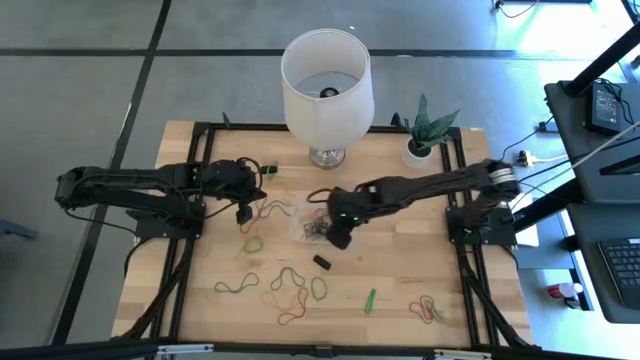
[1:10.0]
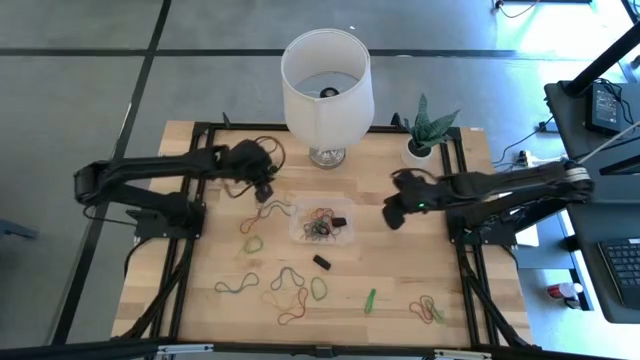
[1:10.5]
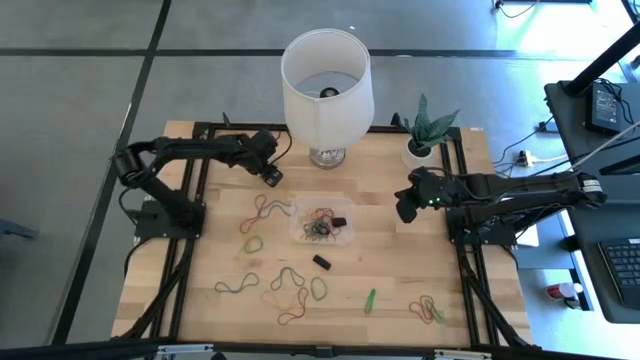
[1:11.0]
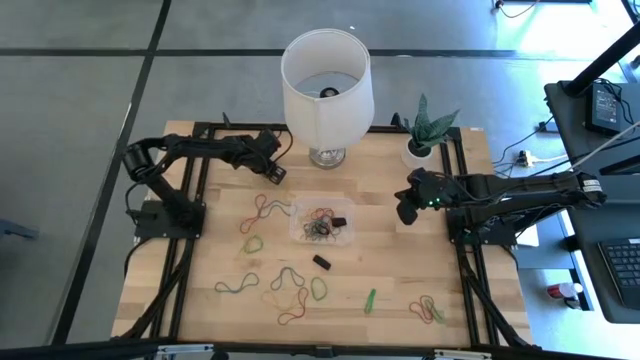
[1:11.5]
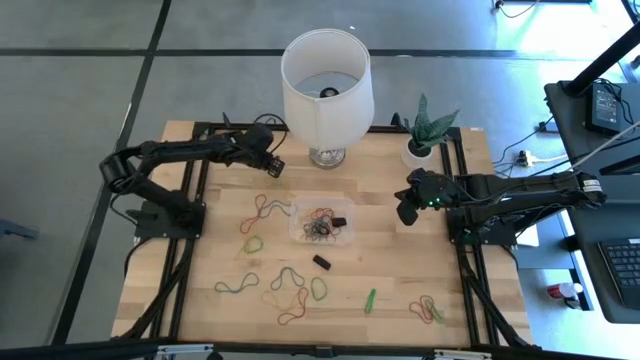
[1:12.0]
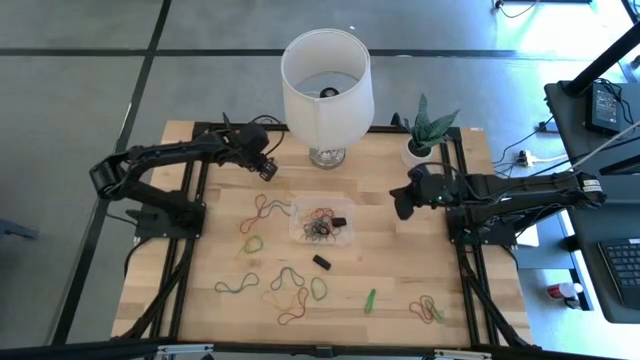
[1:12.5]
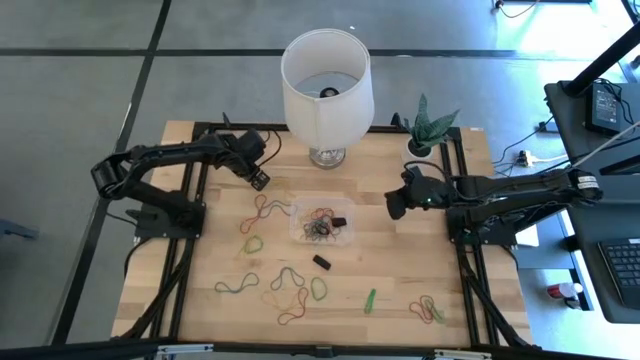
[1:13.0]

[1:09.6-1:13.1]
Task: Pick and place rubber bands into bin
Put the green rubber band into the container

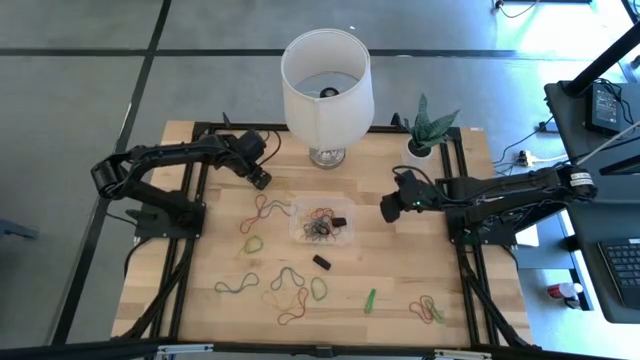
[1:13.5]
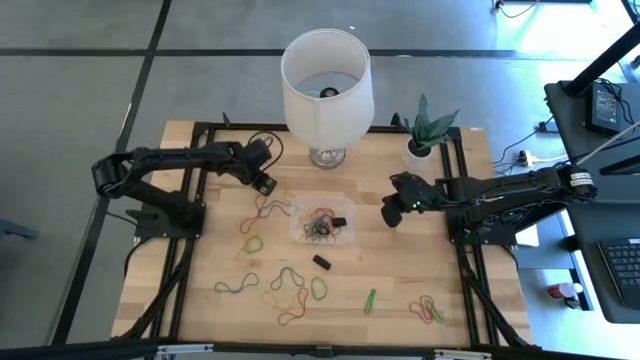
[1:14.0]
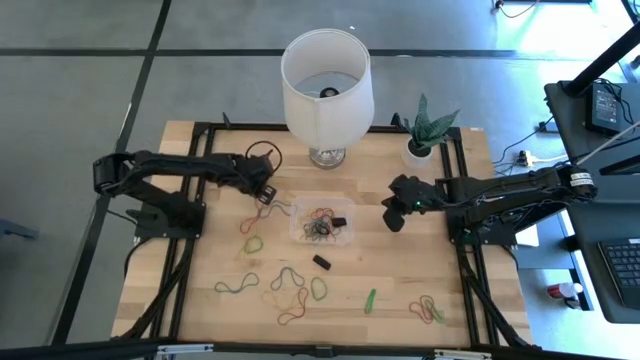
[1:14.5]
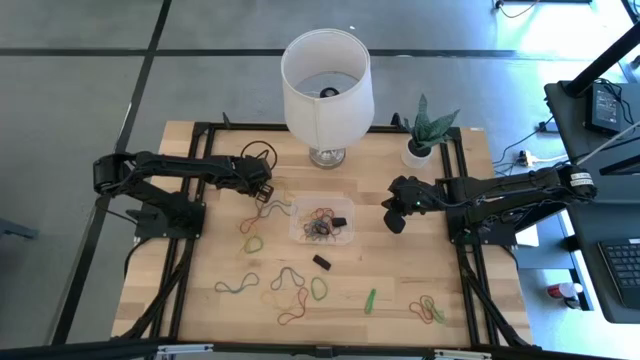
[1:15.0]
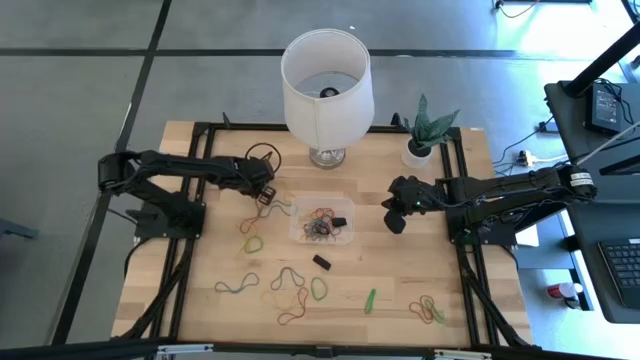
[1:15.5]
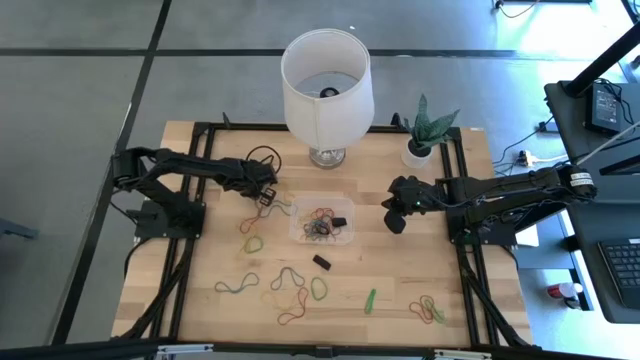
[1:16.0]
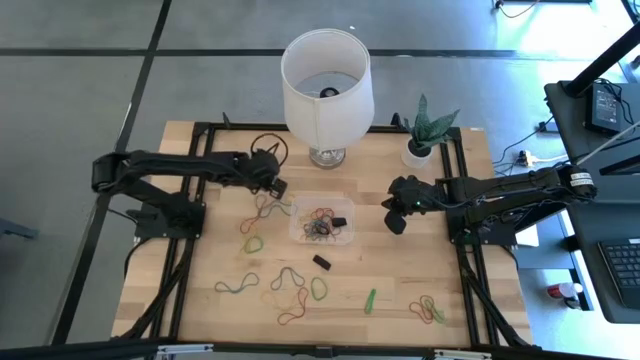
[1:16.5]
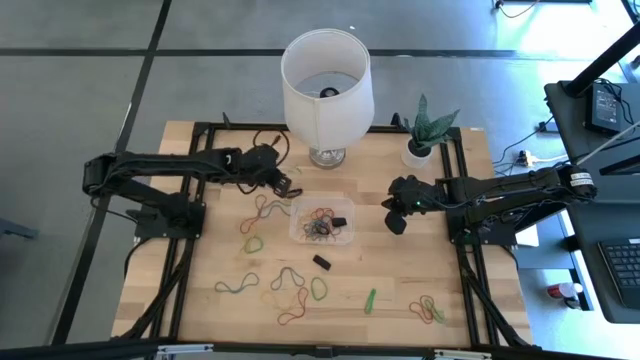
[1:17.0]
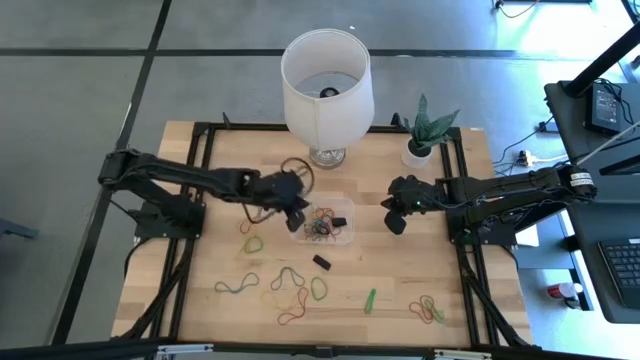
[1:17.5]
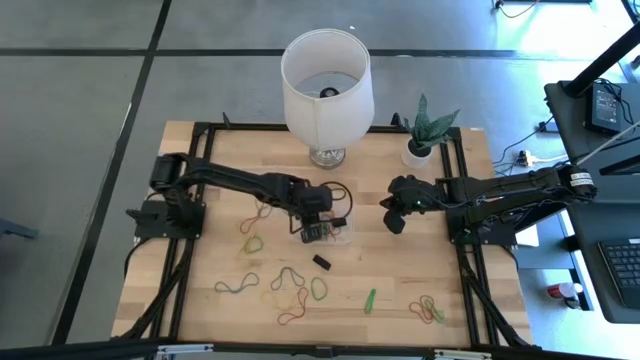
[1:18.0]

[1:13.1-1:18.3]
Put the green rubber band into the container

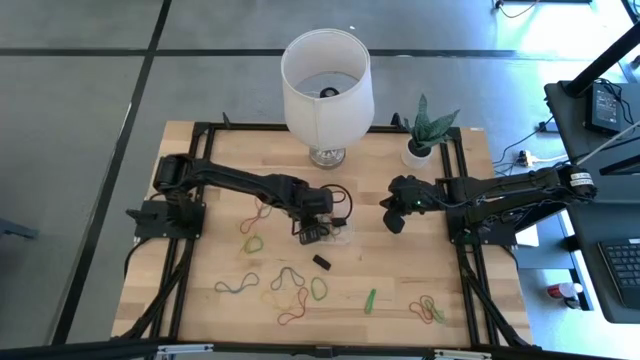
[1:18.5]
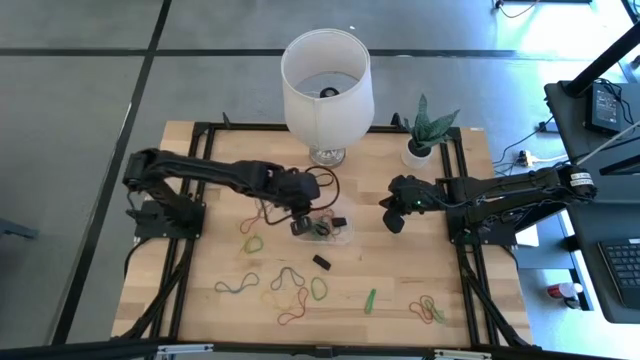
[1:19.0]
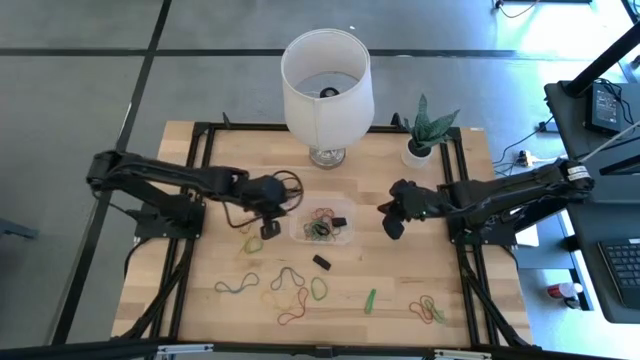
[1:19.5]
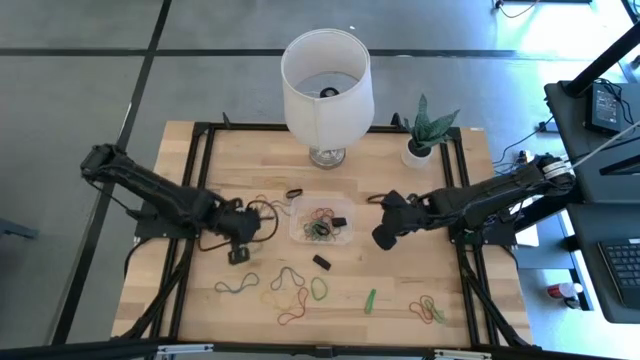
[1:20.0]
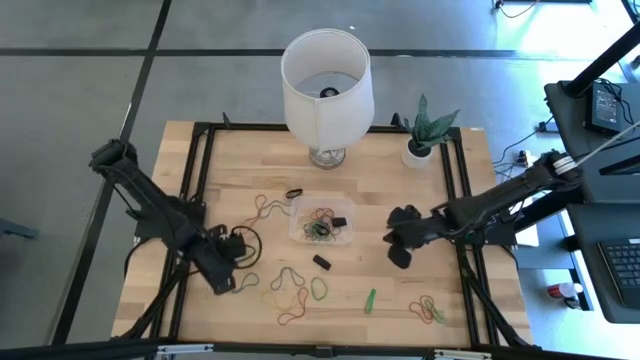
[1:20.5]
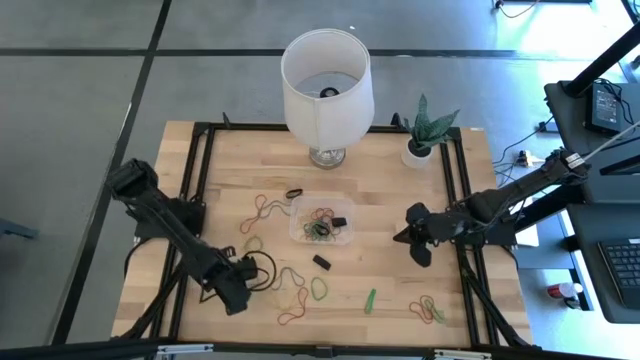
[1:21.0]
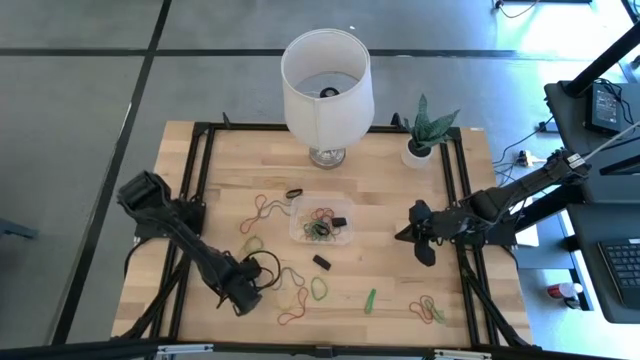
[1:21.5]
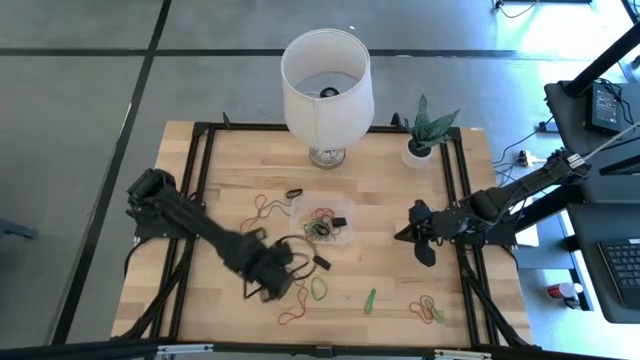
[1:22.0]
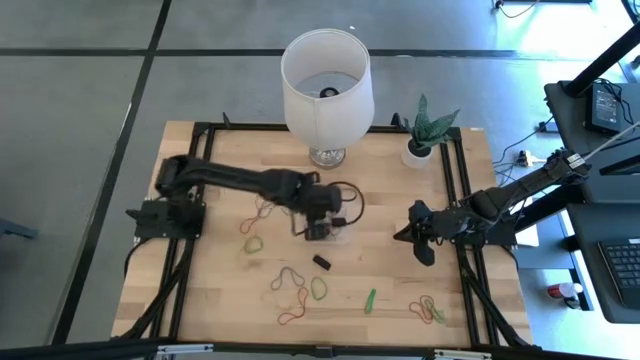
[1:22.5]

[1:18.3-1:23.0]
Put the left blue rubber band into the container

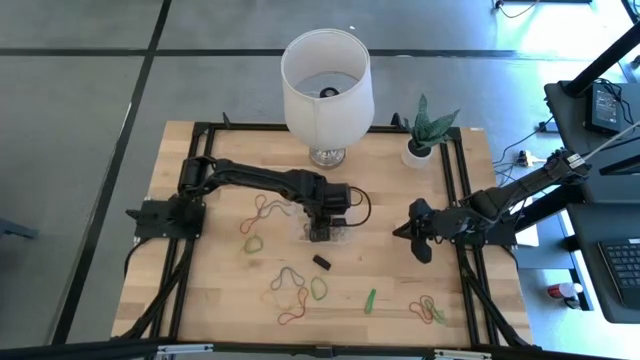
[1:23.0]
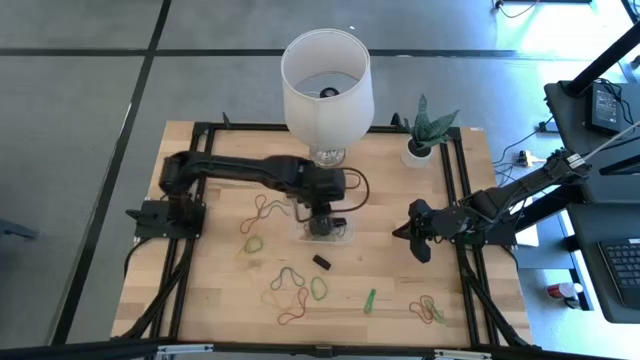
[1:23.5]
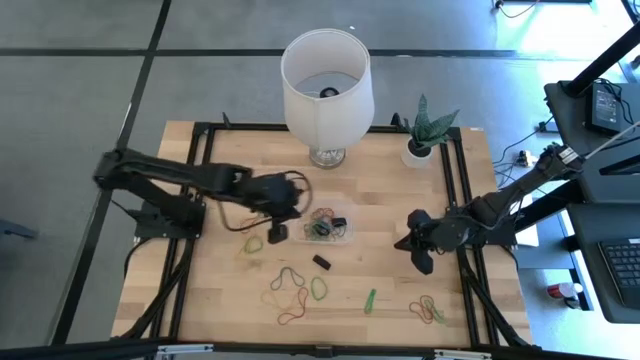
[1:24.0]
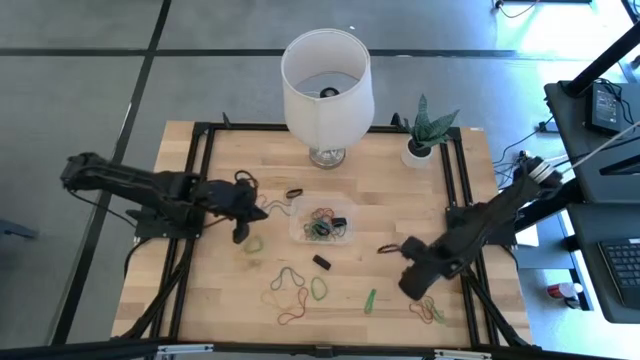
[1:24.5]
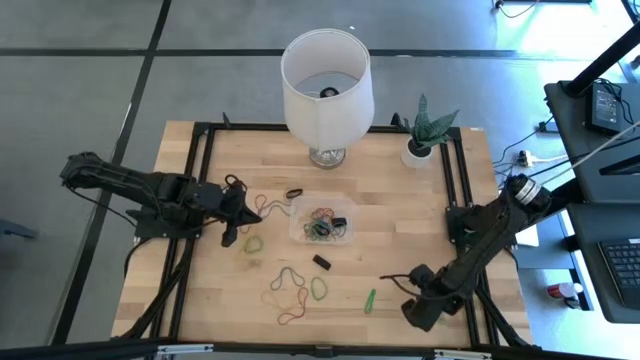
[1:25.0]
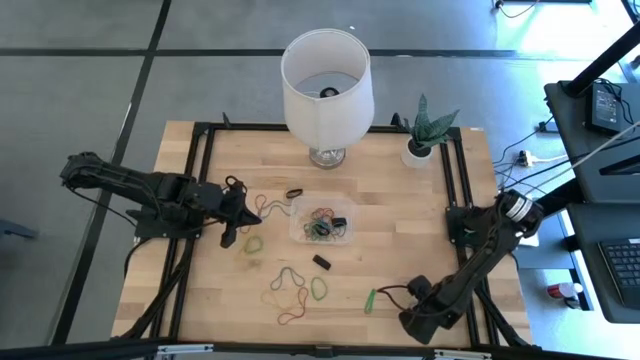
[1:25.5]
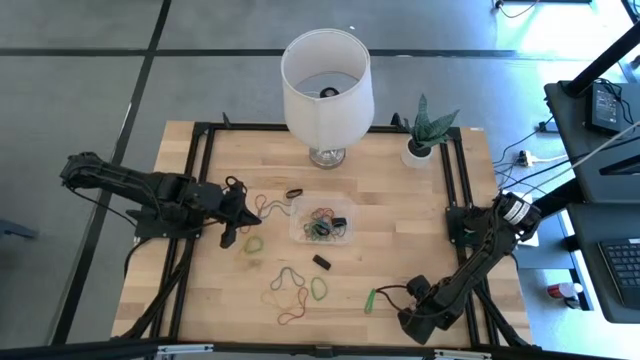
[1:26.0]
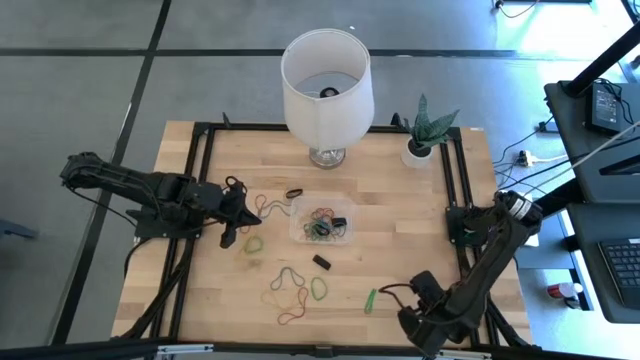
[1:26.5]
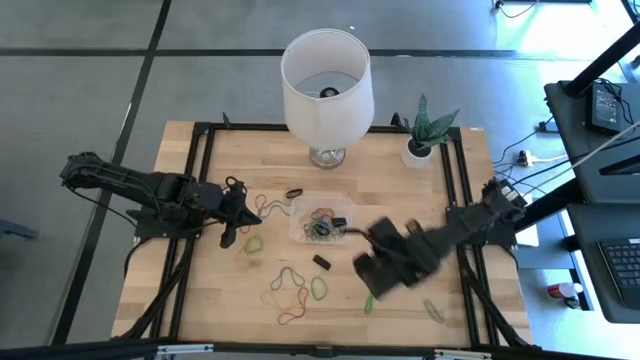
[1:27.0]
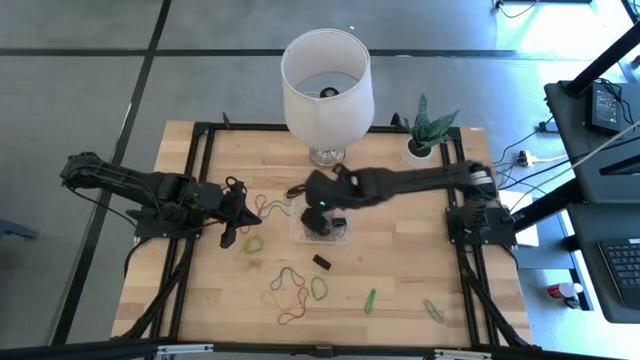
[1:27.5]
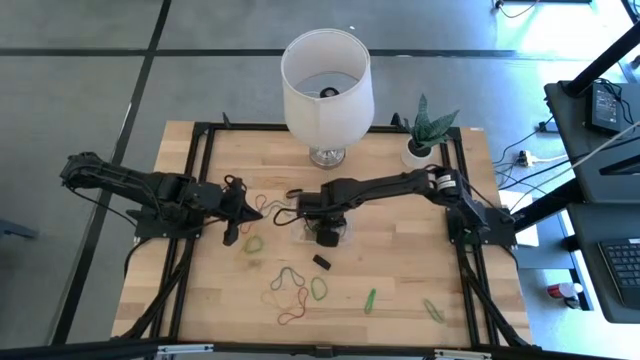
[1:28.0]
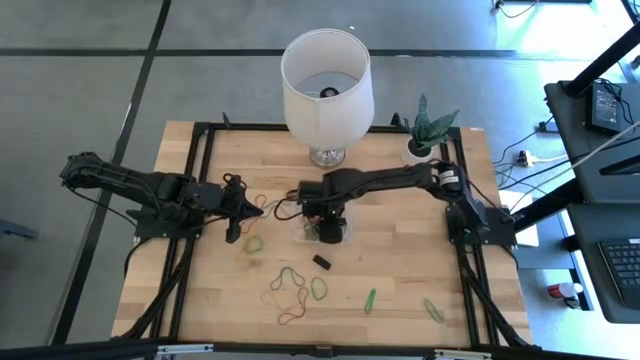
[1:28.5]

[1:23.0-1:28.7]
Put the right red rubber band into the container

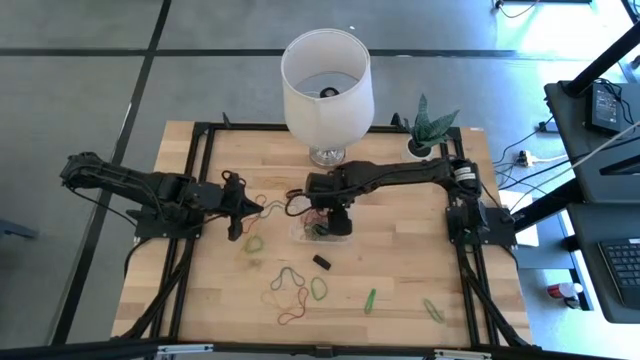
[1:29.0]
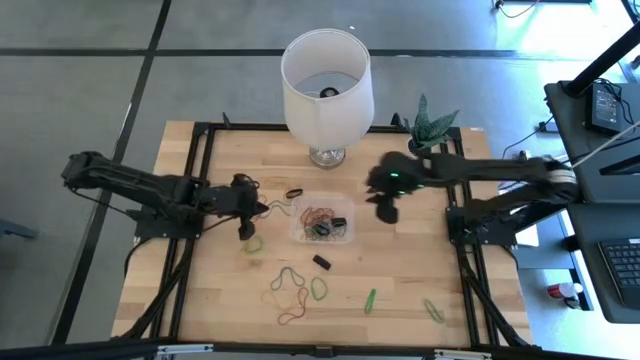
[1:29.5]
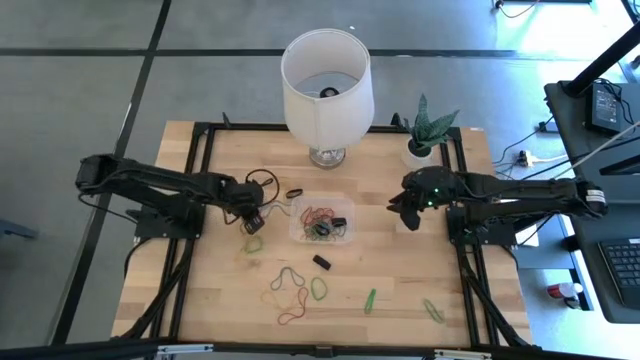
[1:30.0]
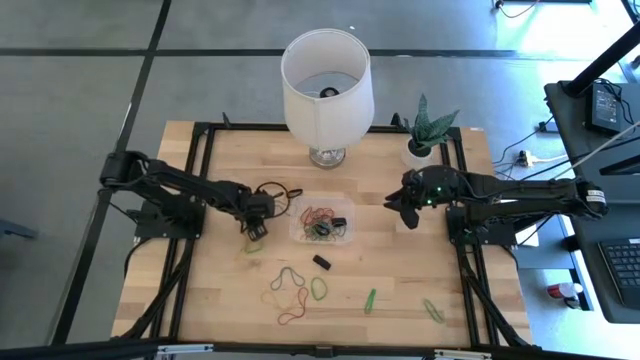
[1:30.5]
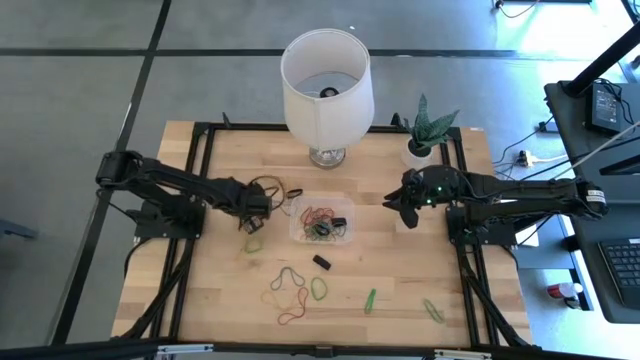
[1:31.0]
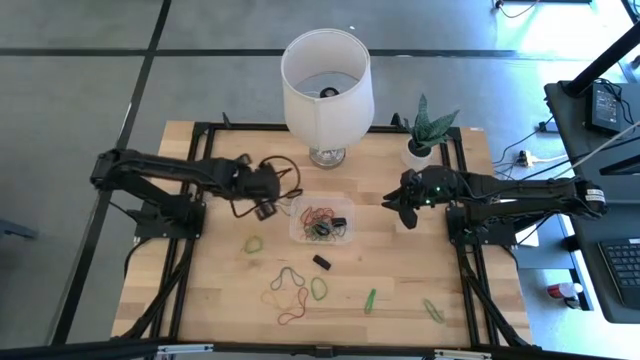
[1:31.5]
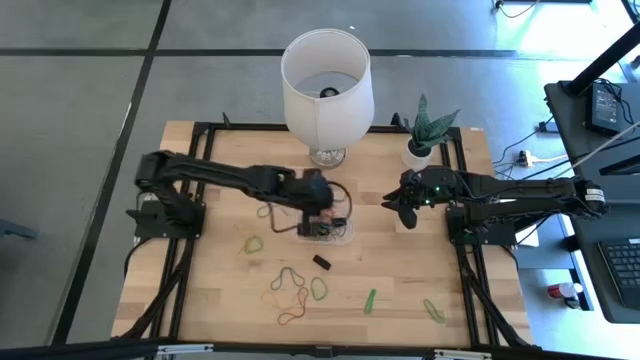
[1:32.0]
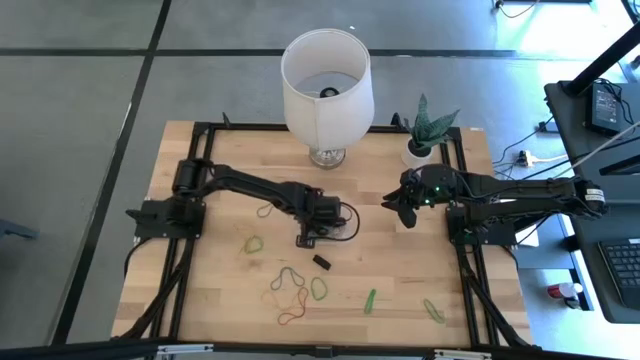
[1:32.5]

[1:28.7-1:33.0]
Put the left red rubber band into the container
